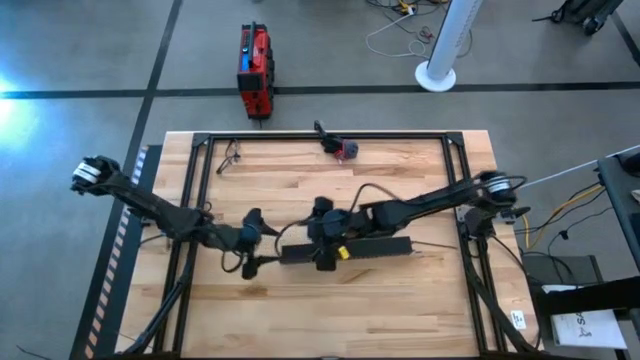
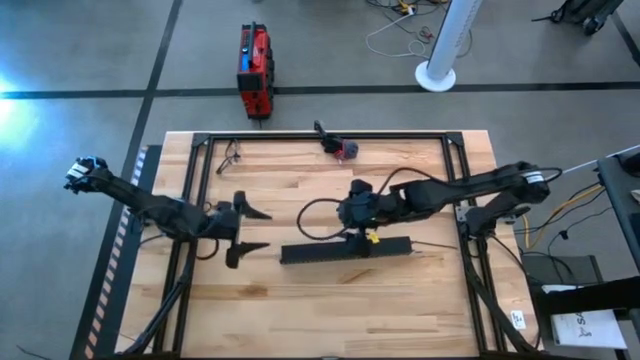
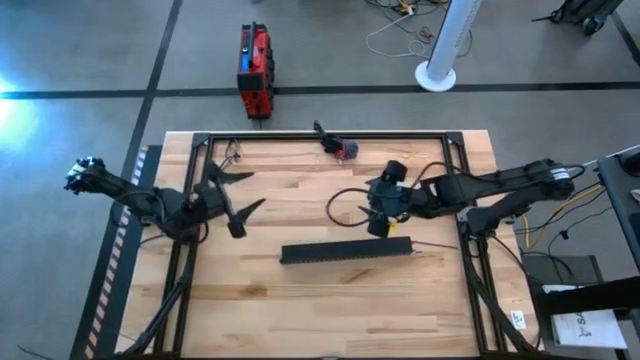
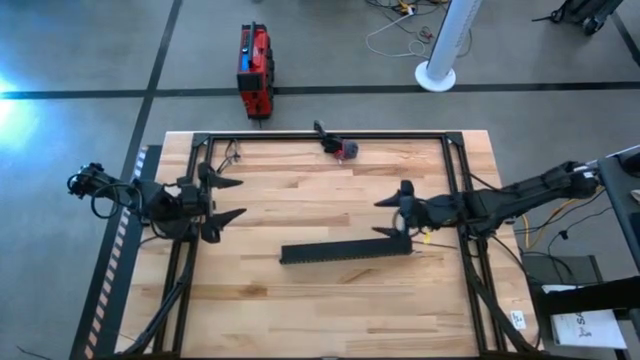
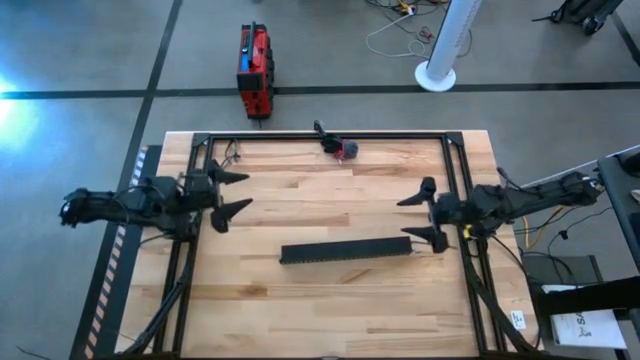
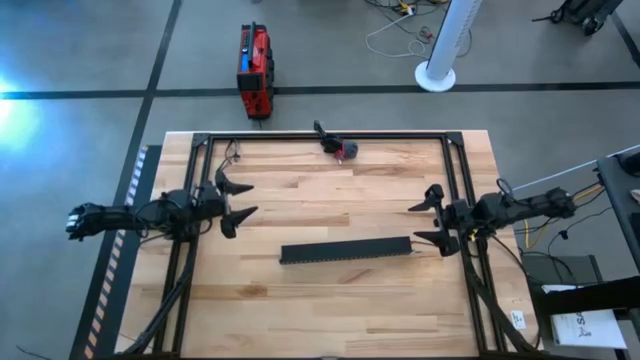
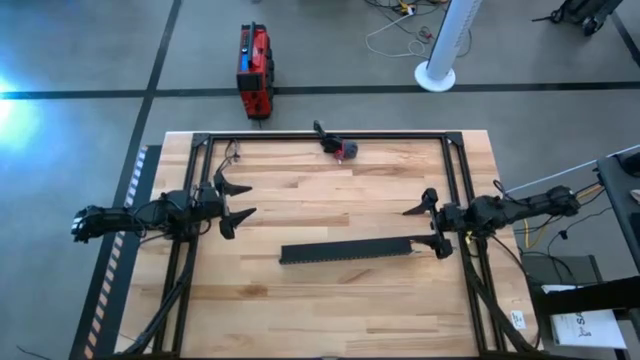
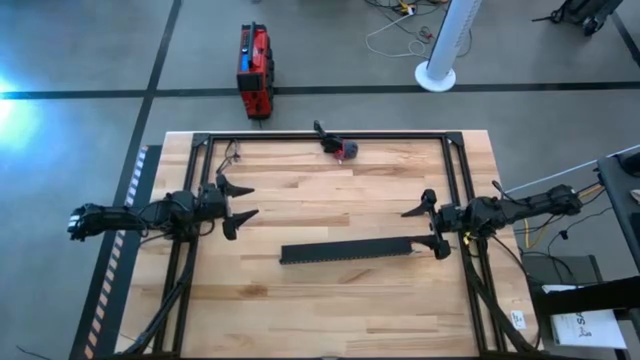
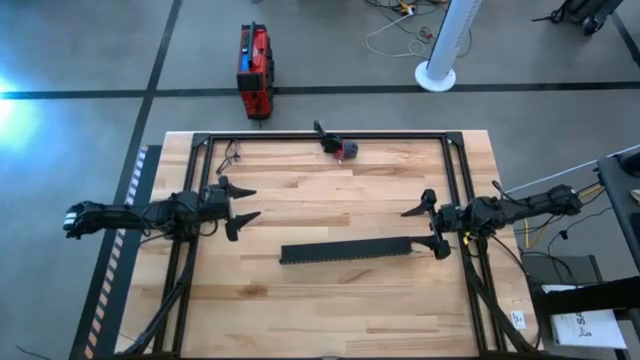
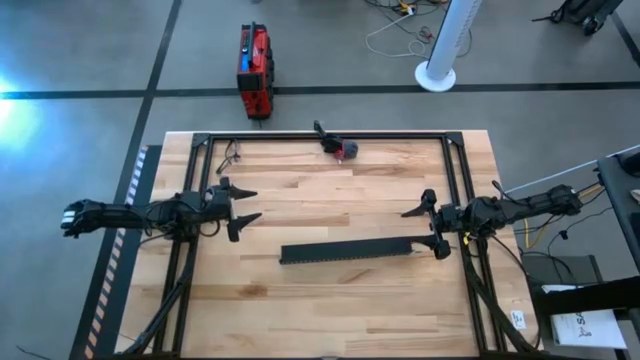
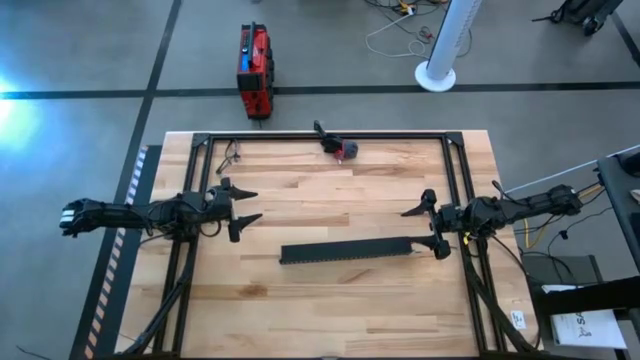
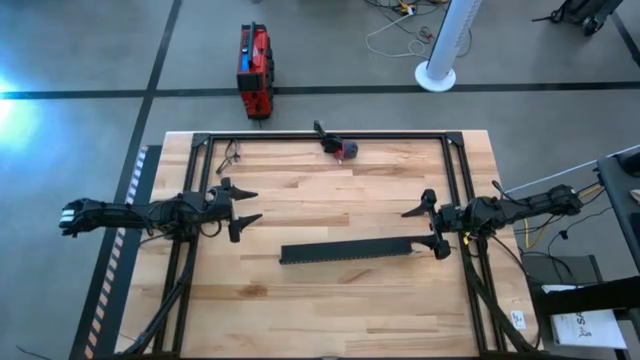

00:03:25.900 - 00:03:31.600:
Task: Ziptie cables
Return to Home Position

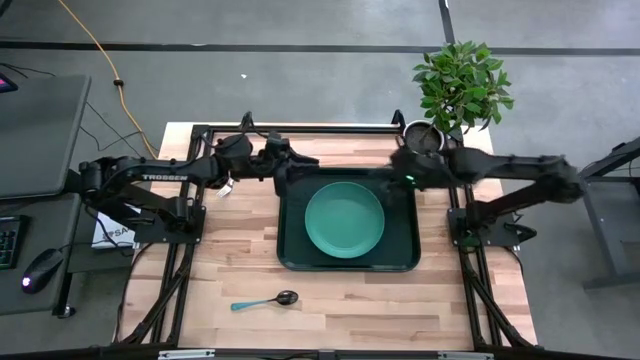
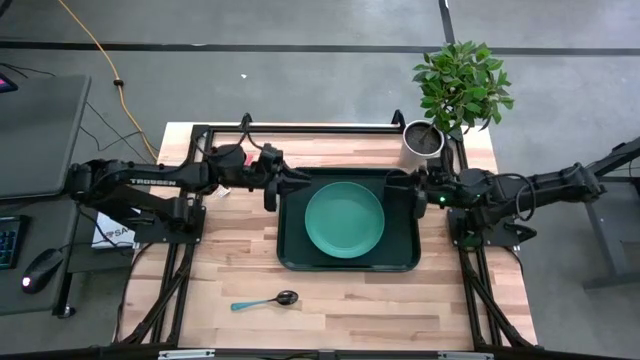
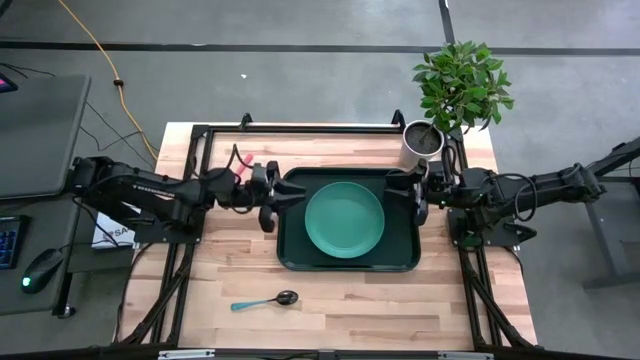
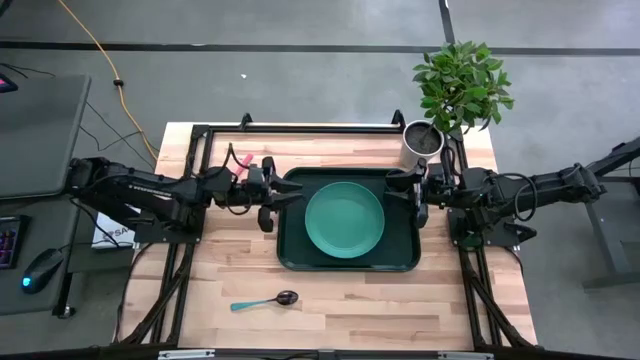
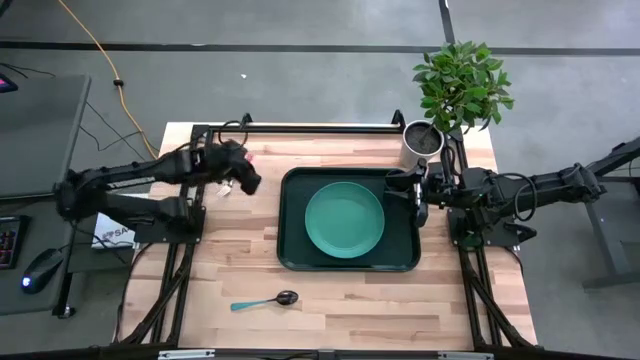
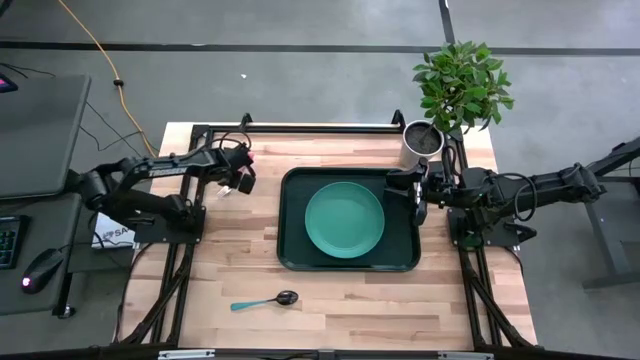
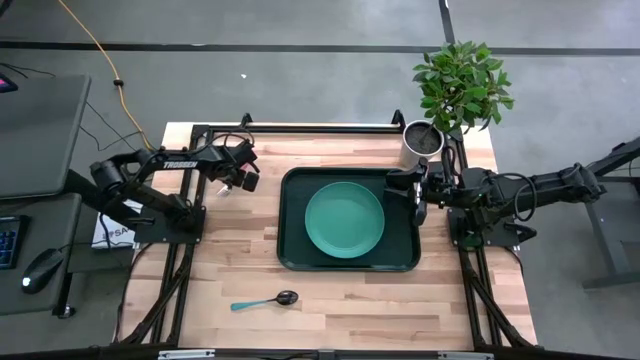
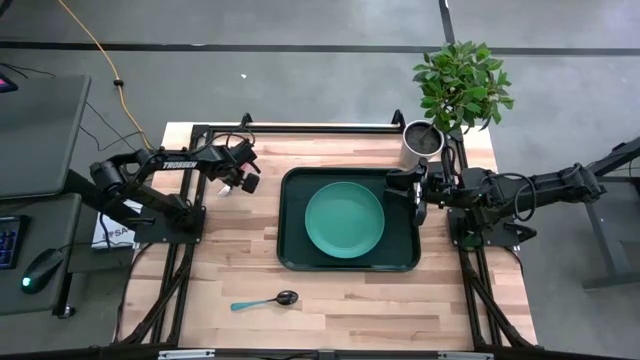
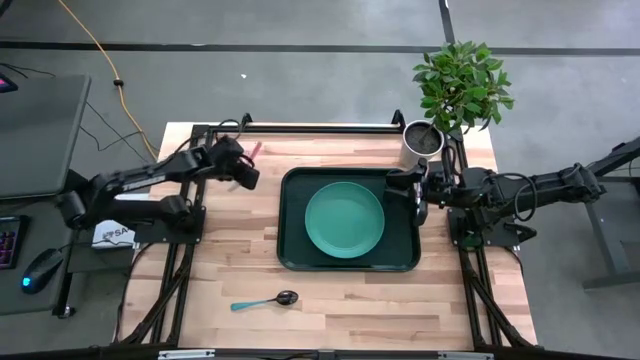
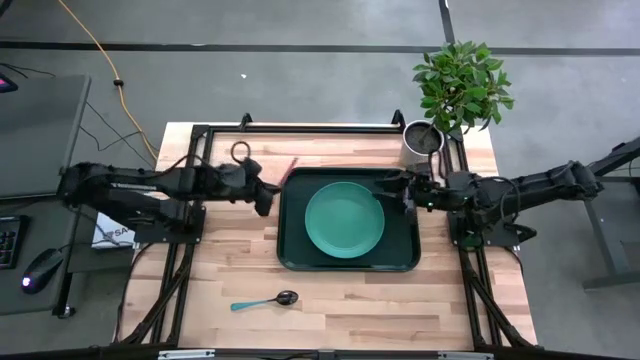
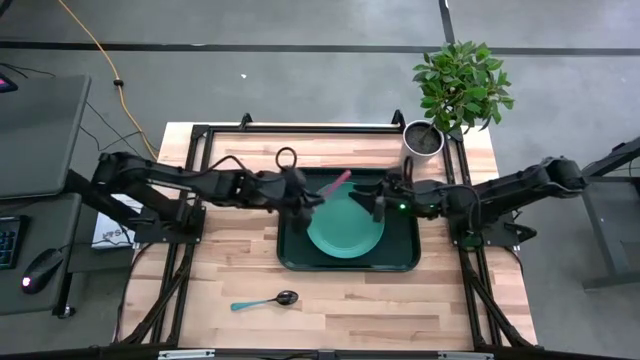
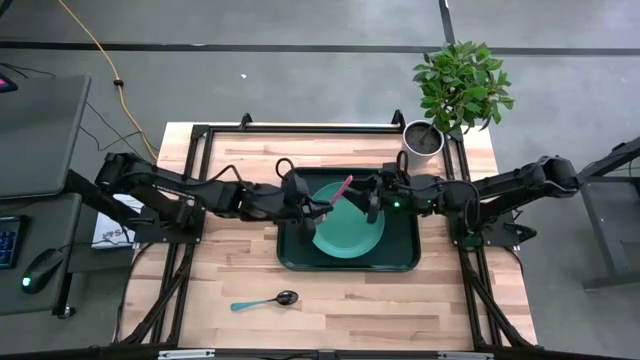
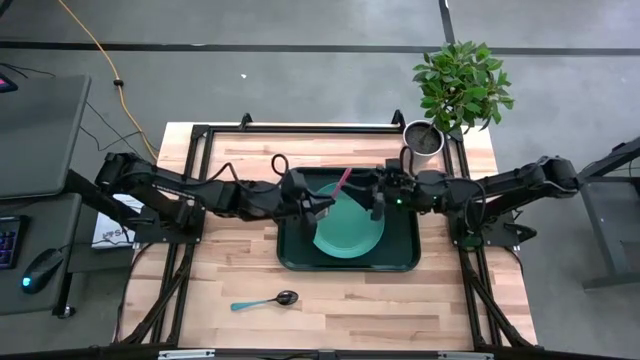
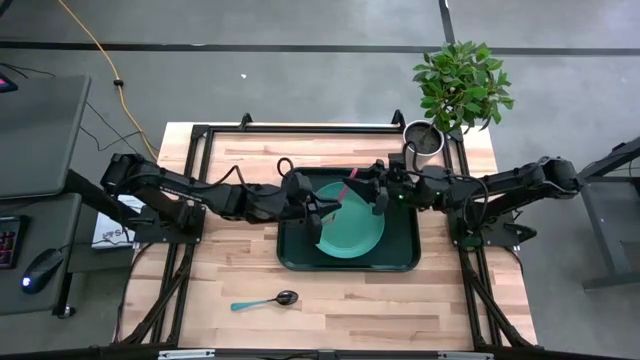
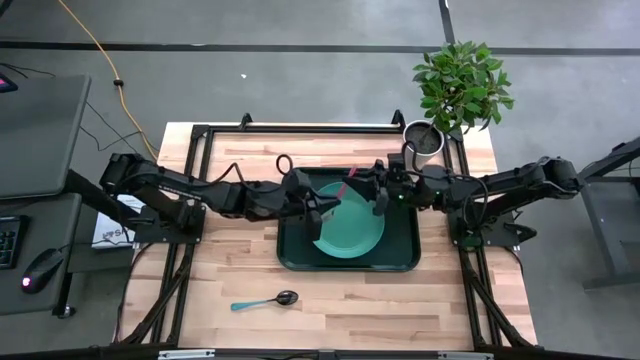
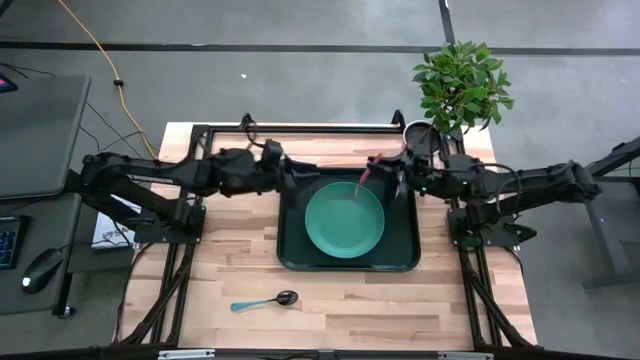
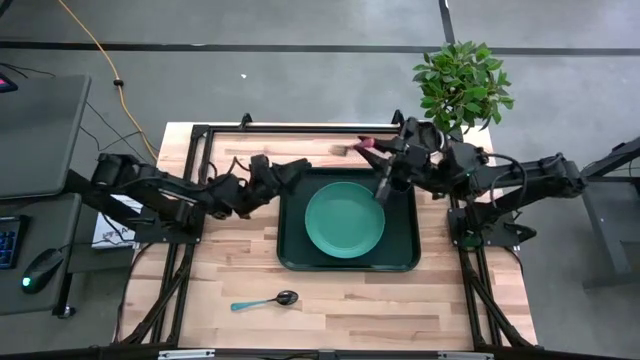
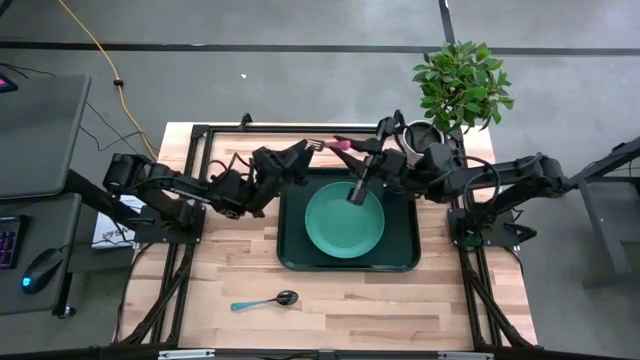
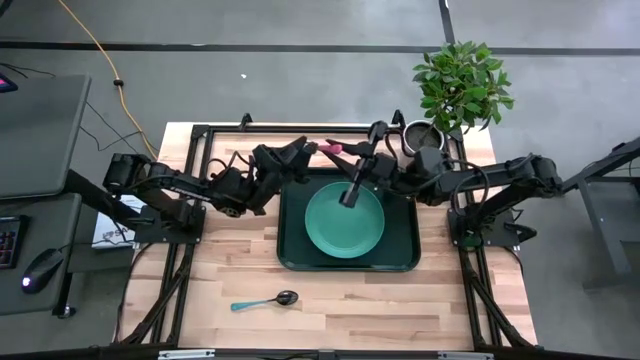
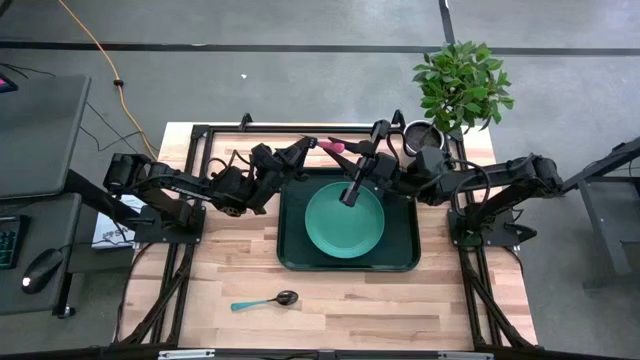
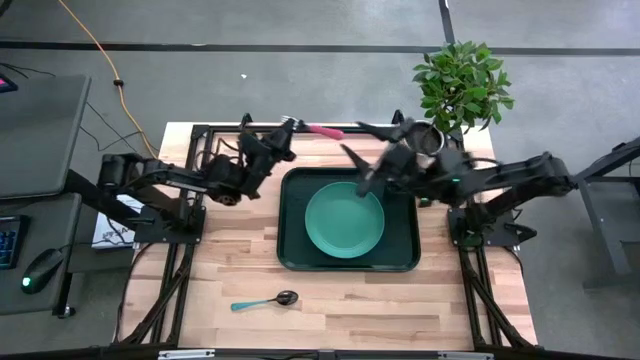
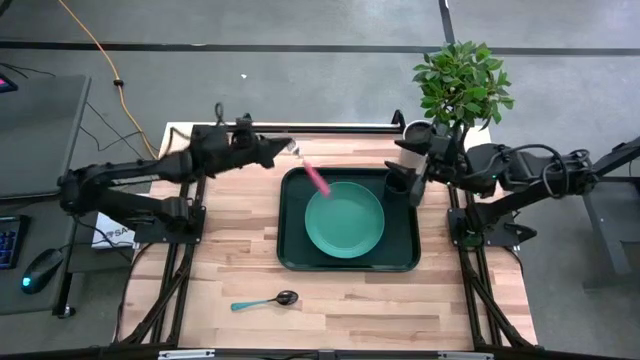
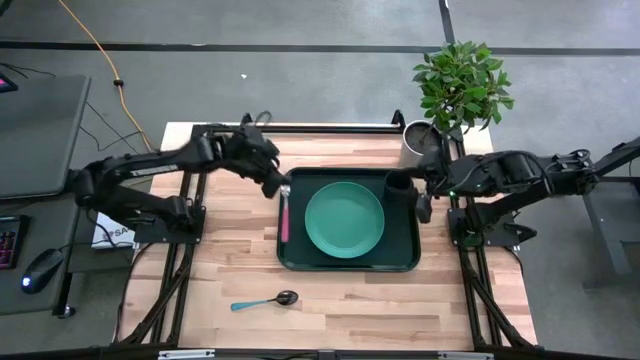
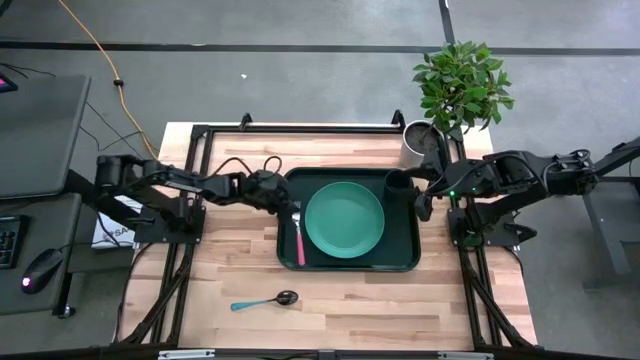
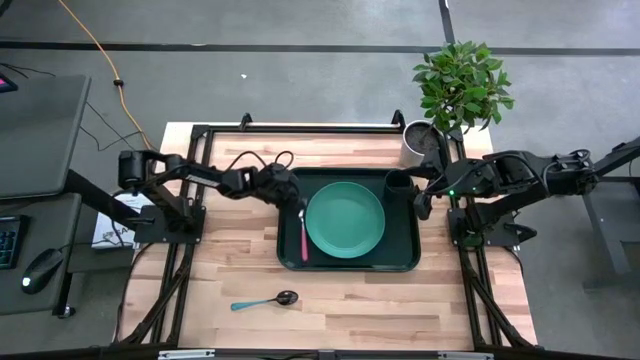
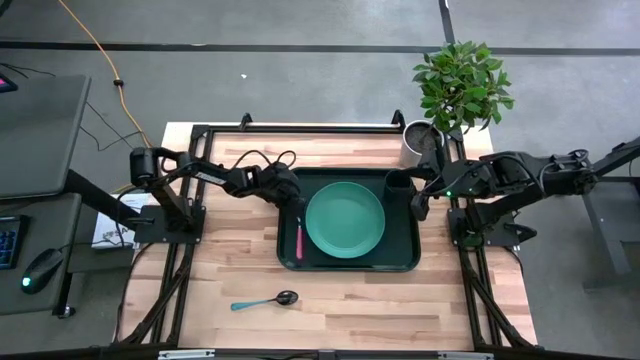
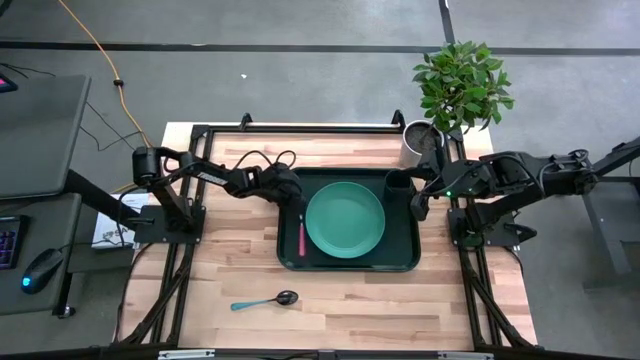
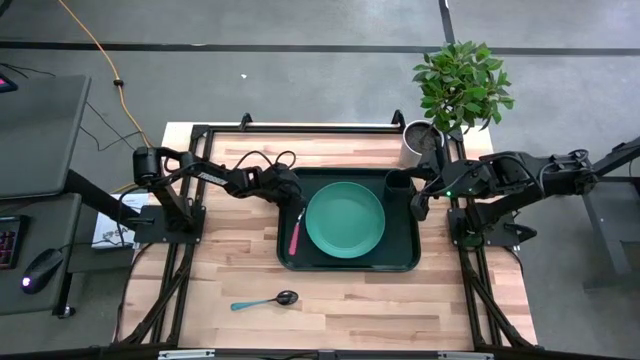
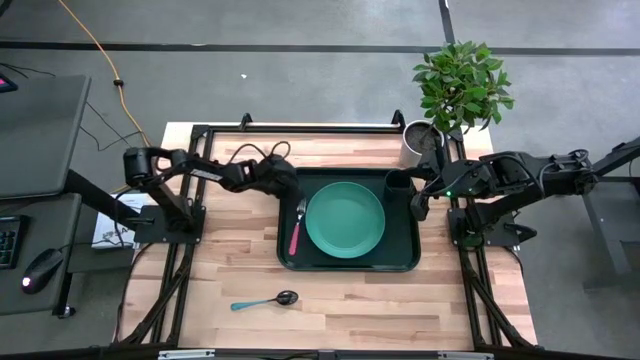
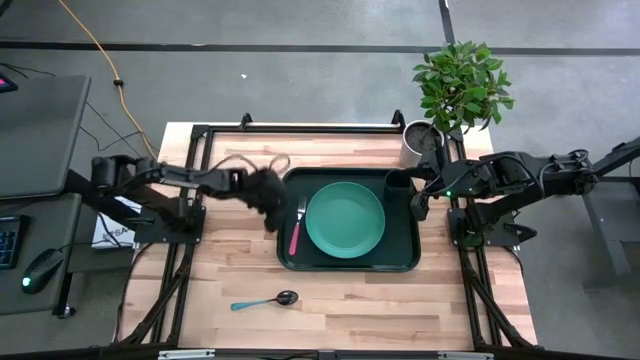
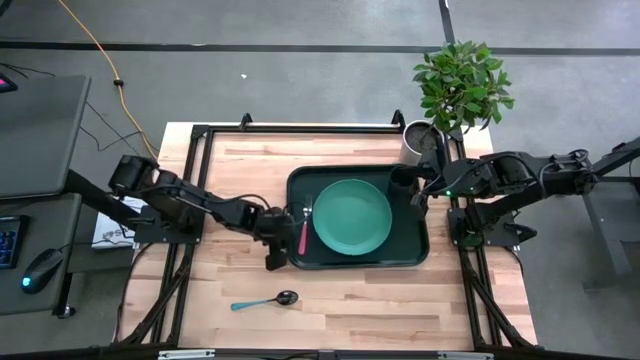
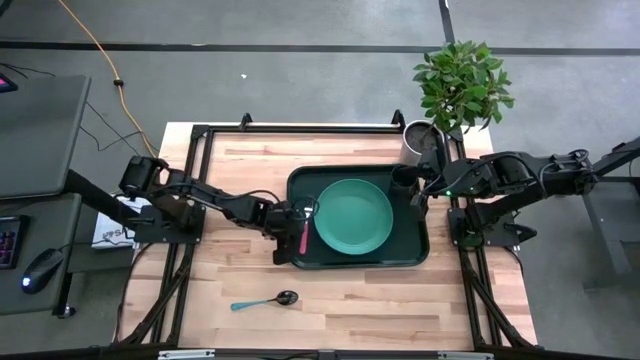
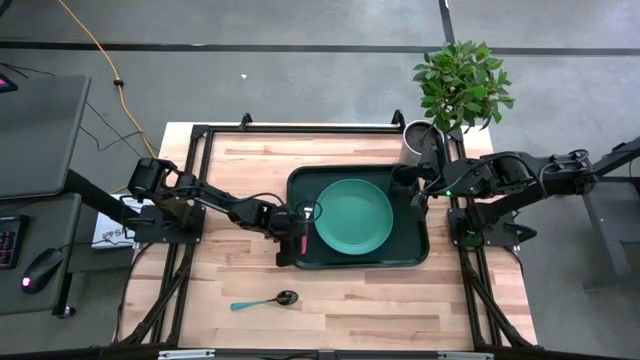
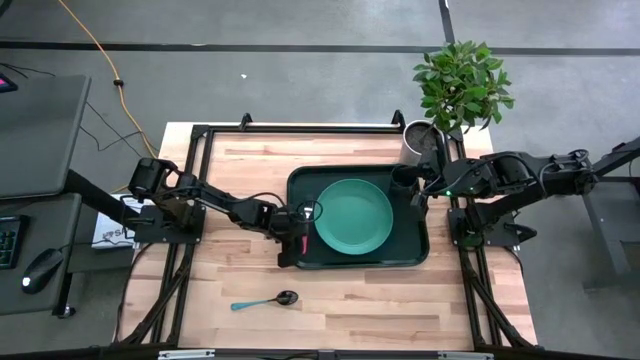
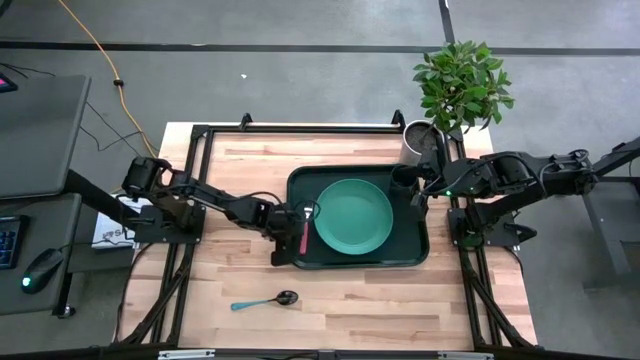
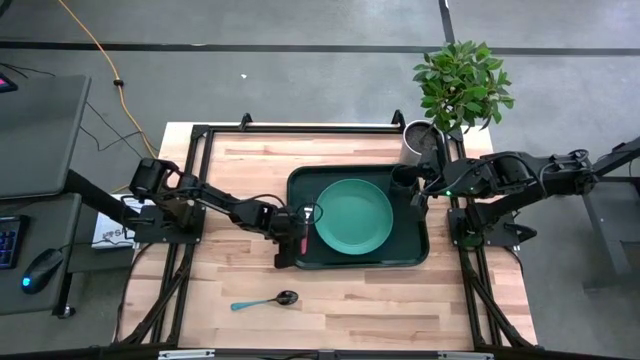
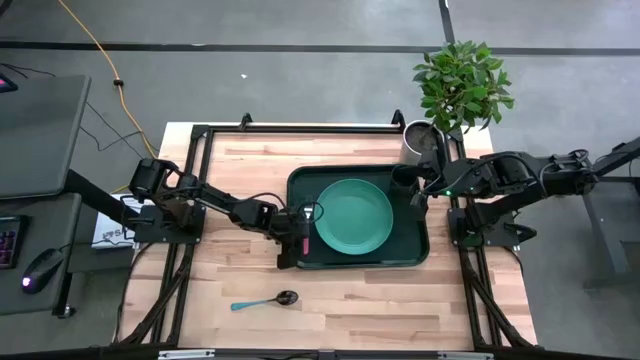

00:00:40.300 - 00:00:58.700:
Task: Pick and place plate/cup/fork/spoon on tray
Put the pink fork on the green serving tray
